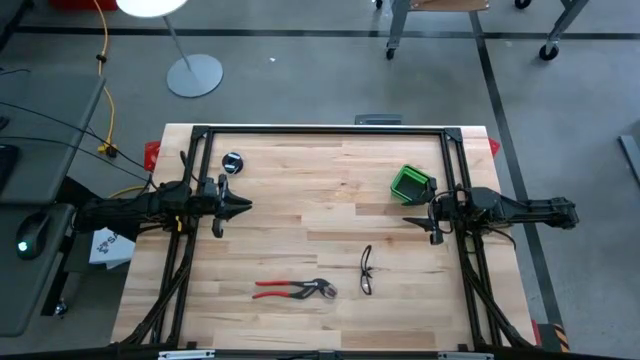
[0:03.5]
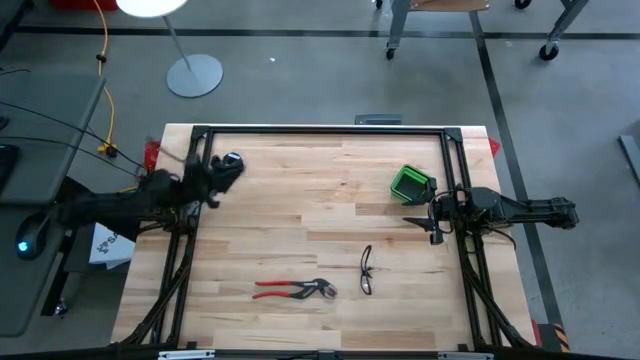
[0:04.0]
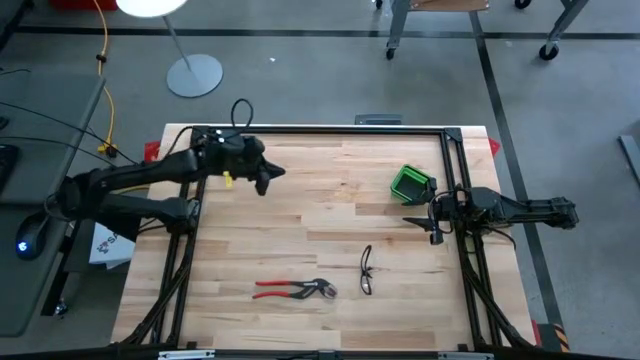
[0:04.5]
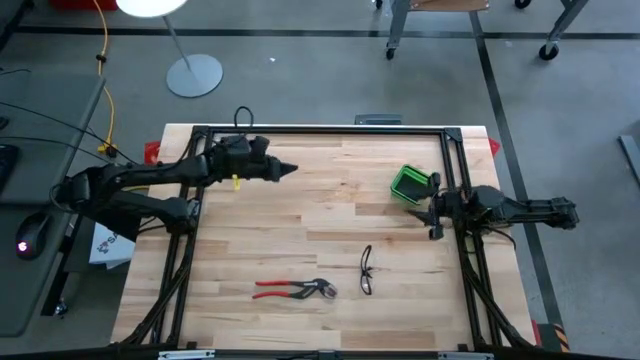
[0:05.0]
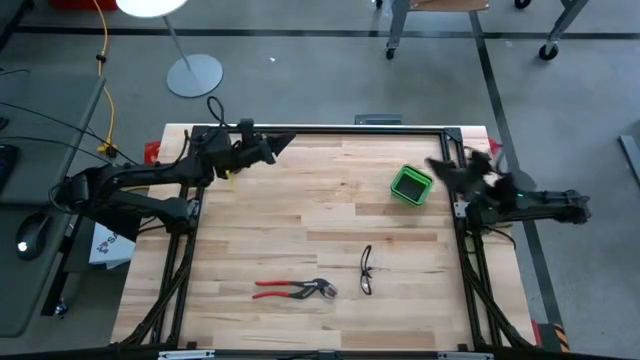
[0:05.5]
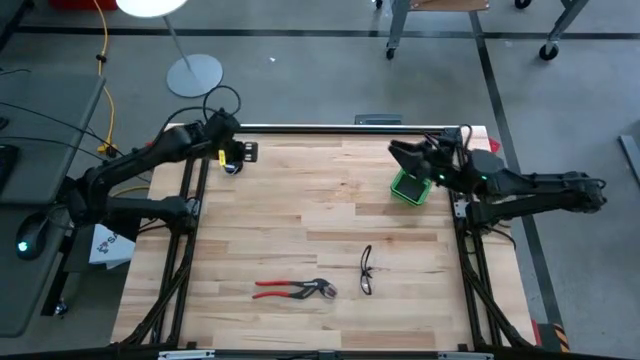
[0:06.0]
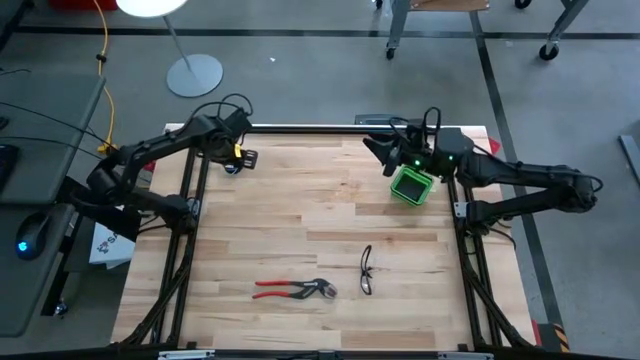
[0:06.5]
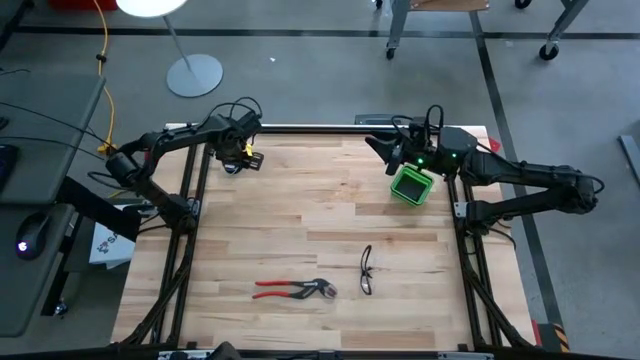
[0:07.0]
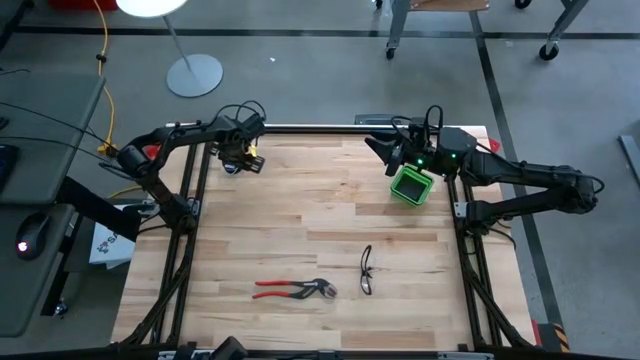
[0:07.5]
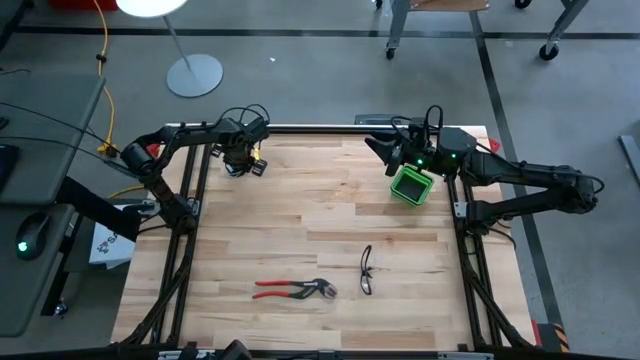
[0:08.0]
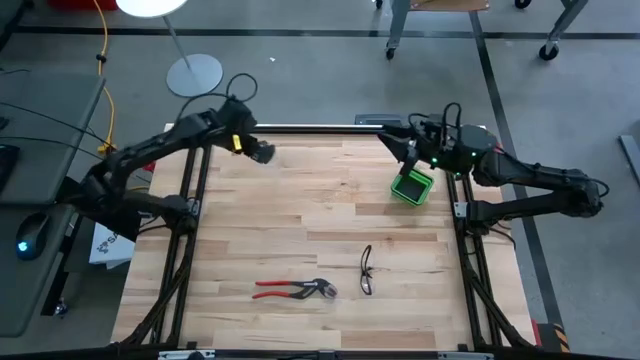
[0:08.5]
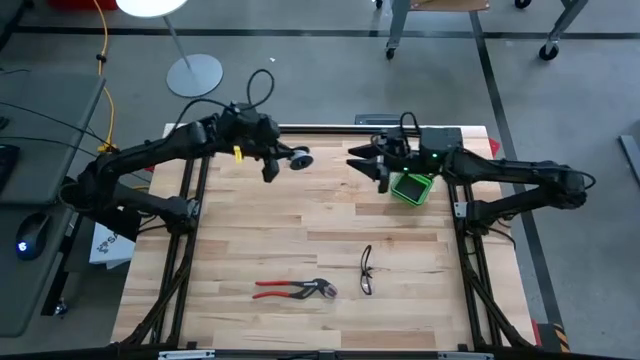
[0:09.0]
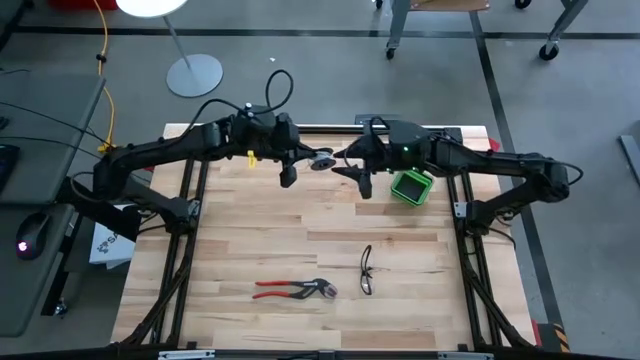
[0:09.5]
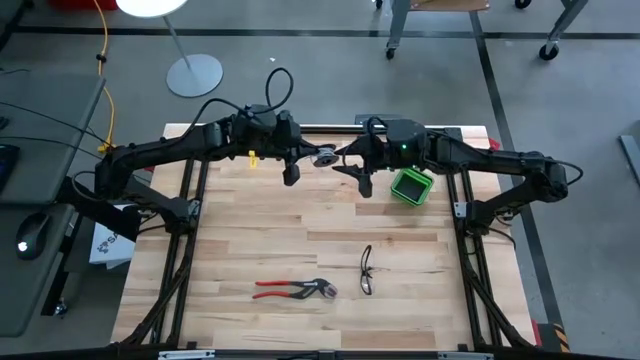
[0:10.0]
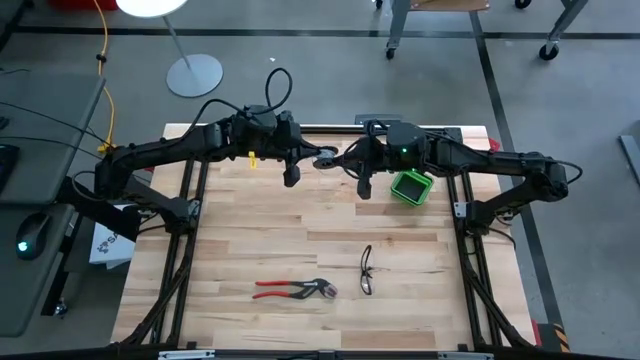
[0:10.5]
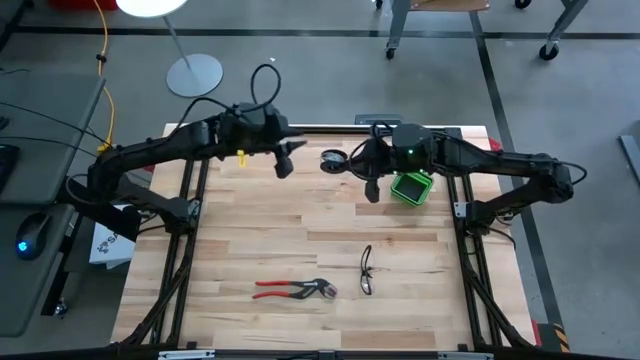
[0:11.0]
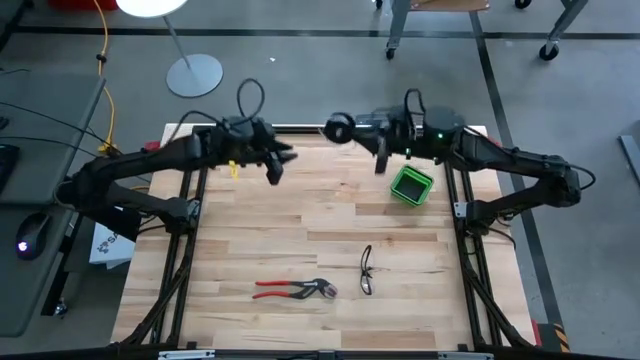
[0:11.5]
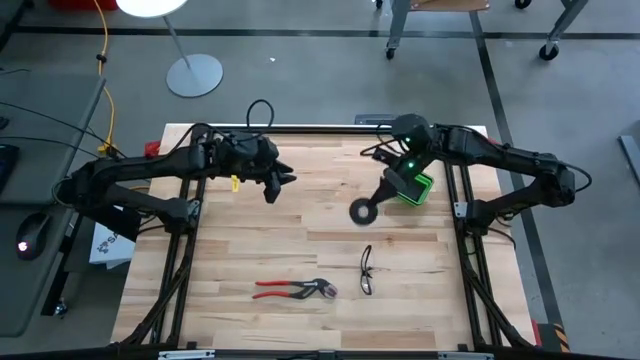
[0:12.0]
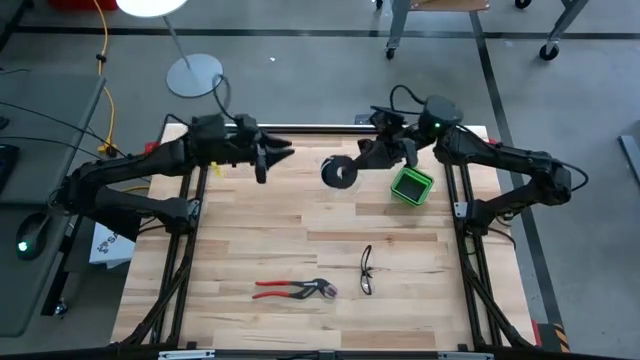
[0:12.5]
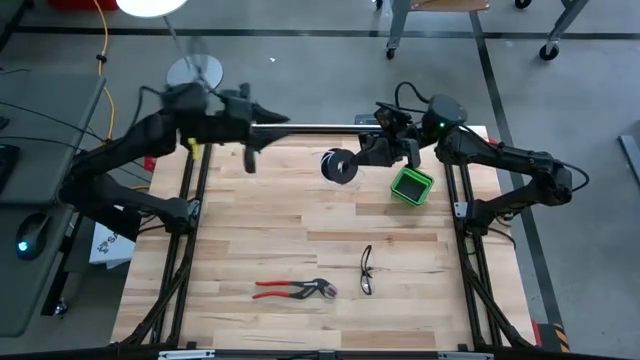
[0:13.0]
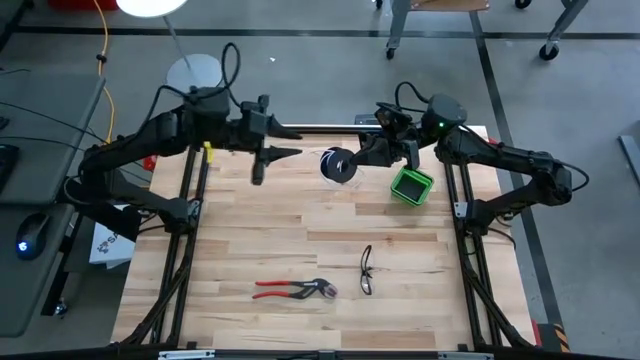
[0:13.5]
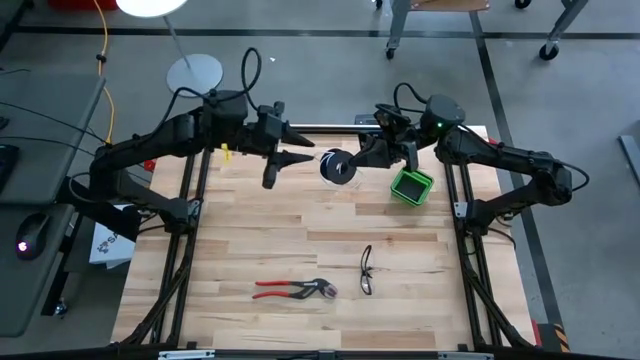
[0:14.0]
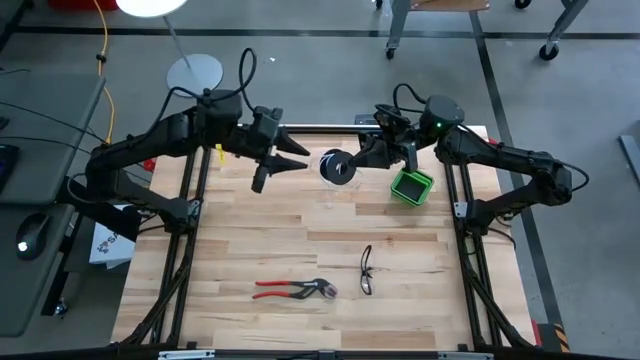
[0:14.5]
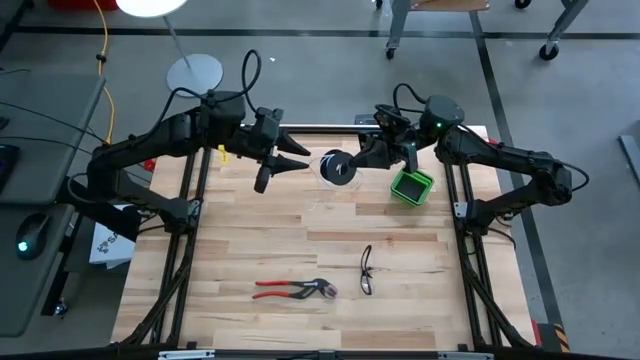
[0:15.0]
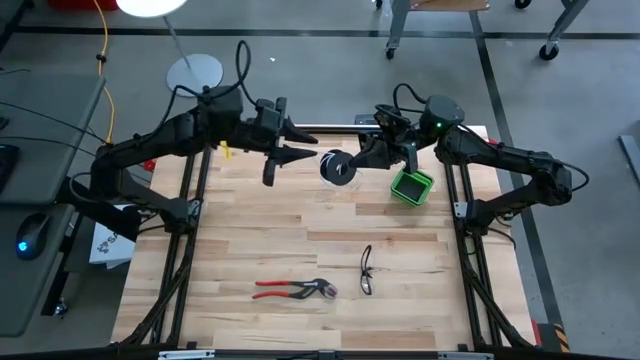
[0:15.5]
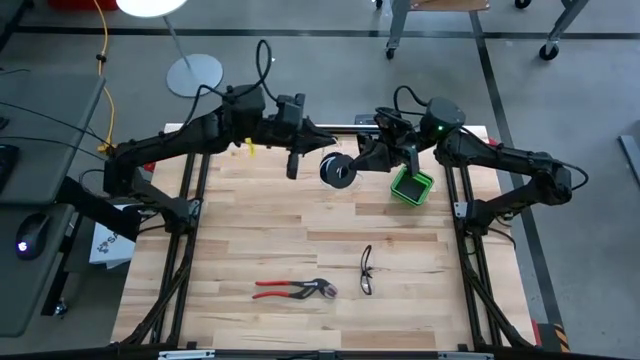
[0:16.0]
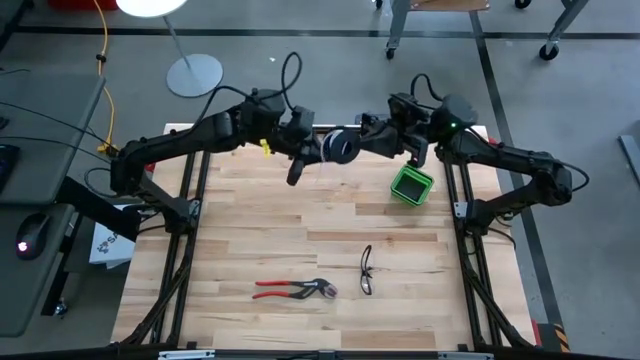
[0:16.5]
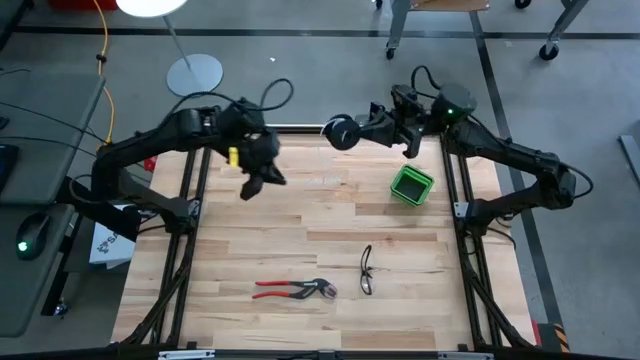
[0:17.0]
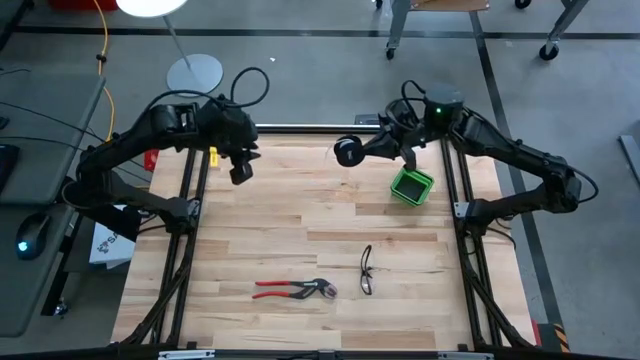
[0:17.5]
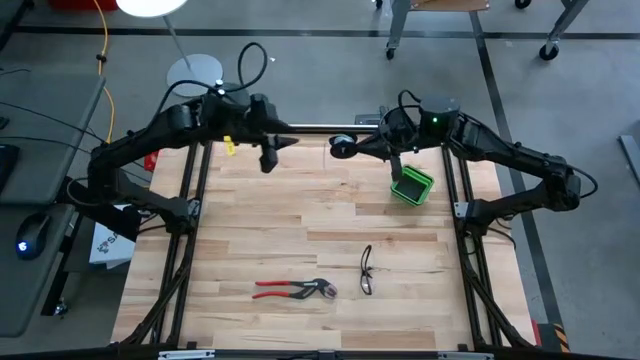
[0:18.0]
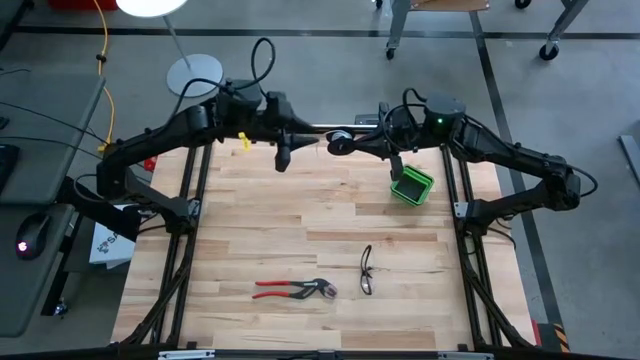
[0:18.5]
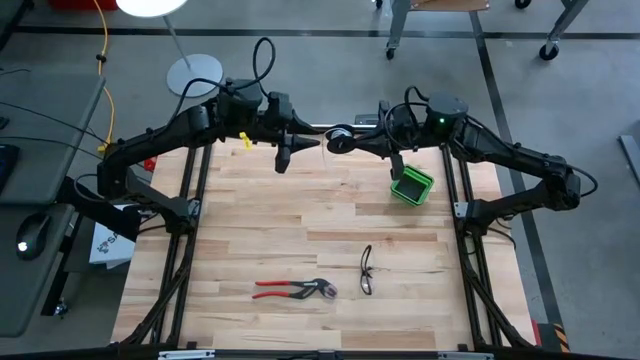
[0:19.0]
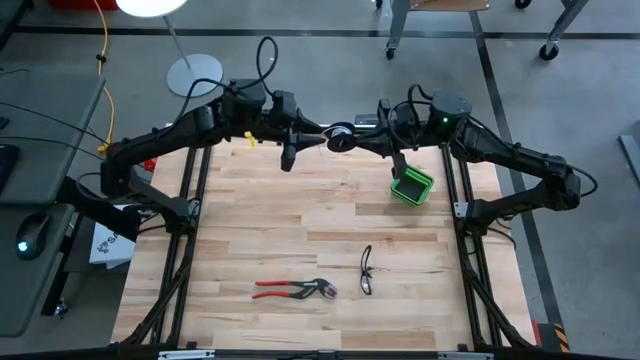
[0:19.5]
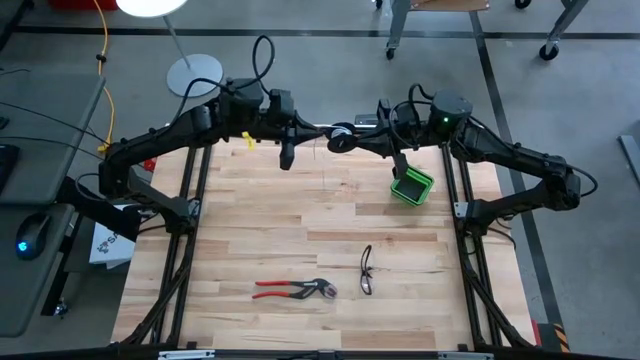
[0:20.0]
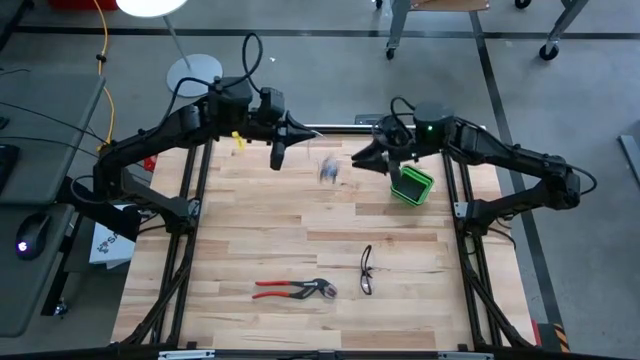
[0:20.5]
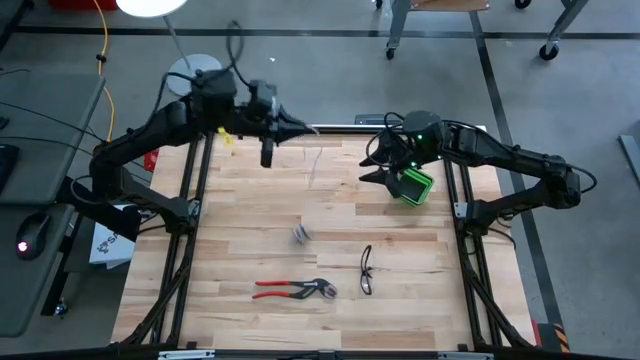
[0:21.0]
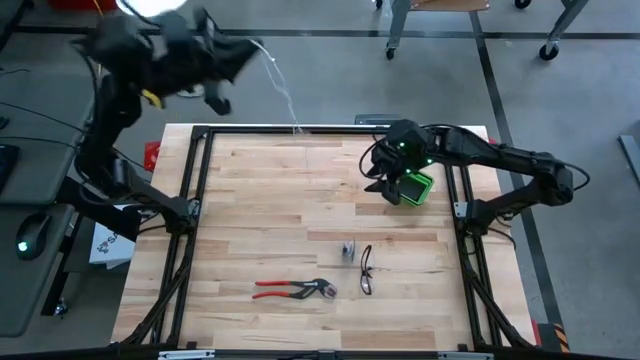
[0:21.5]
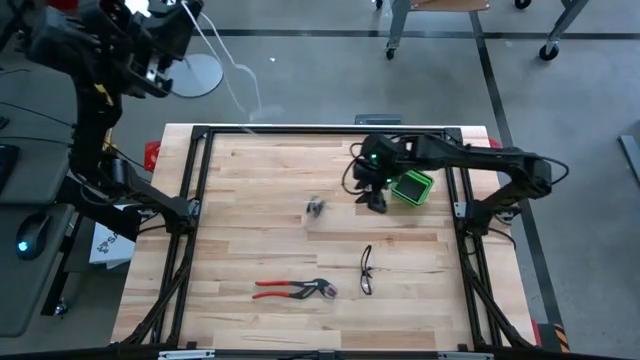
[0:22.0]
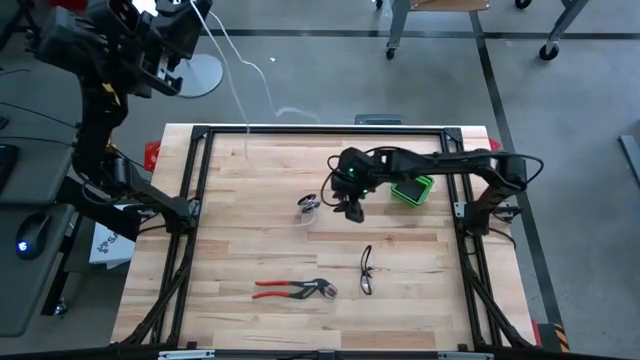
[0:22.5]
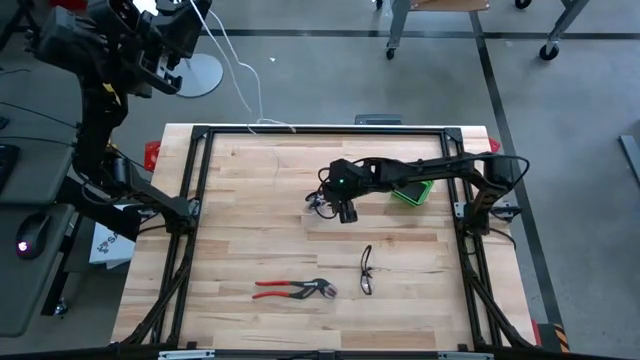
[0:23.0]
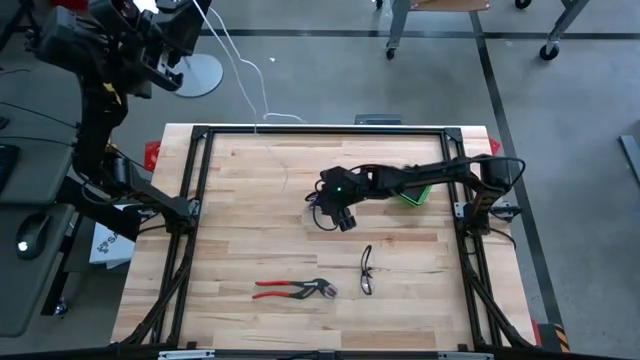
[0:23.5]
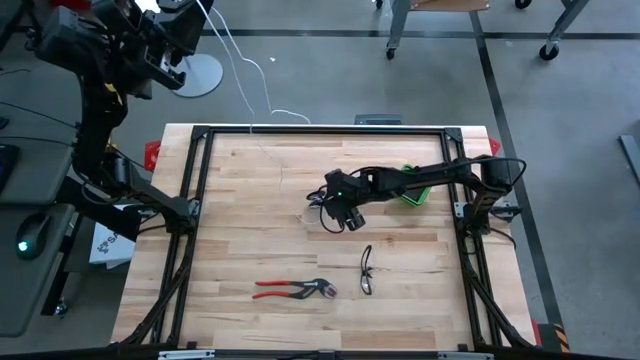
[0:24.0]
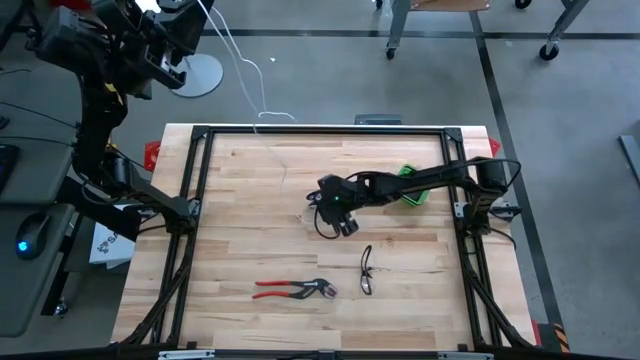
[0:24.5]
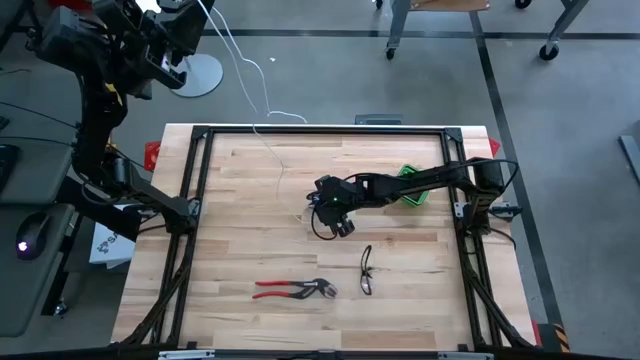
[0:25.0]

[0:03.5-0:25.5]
Task: Coil cords
Uncoil the wire from the spool
